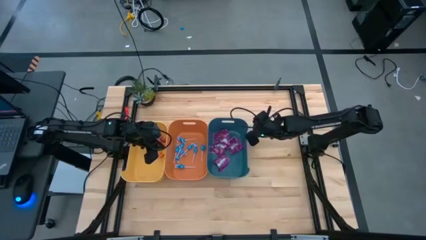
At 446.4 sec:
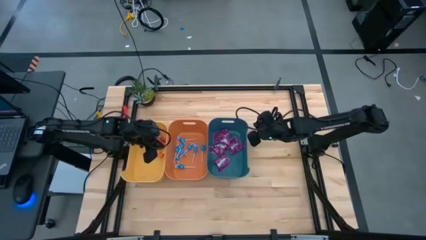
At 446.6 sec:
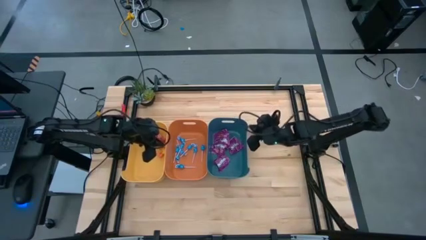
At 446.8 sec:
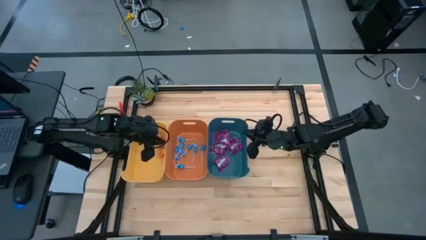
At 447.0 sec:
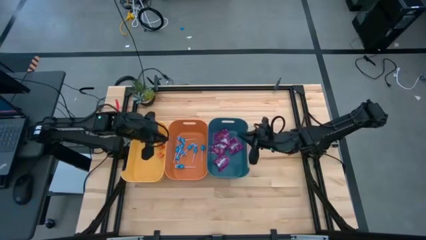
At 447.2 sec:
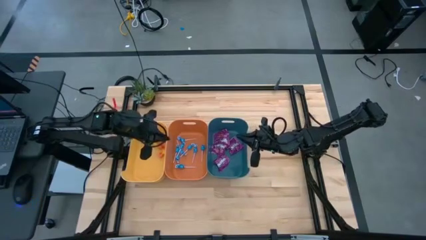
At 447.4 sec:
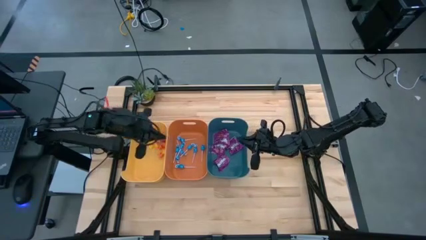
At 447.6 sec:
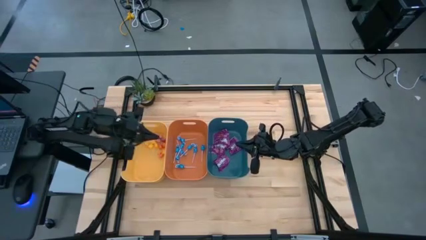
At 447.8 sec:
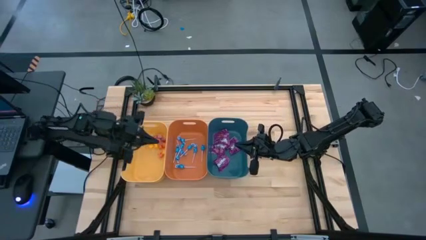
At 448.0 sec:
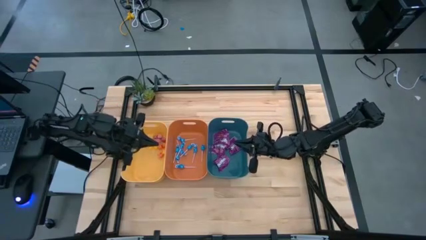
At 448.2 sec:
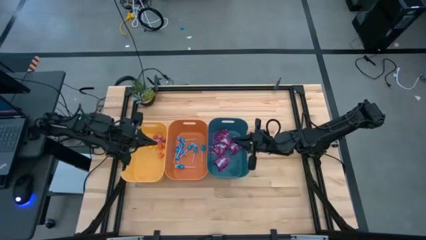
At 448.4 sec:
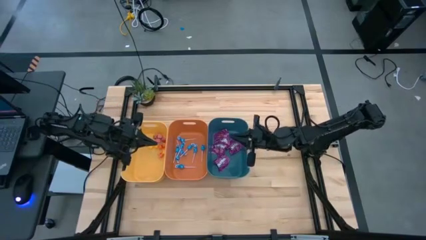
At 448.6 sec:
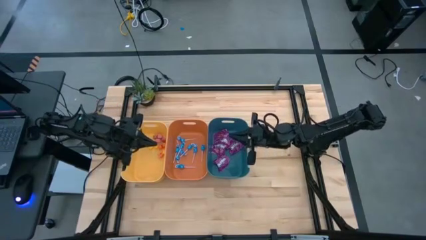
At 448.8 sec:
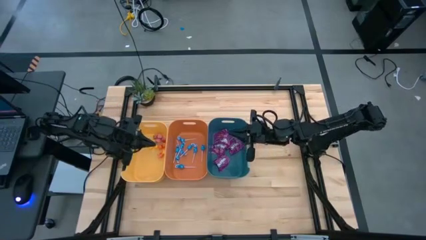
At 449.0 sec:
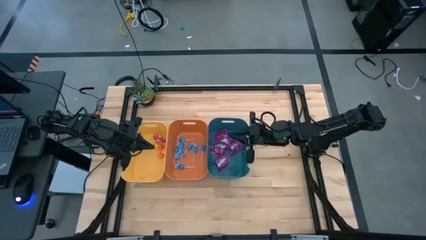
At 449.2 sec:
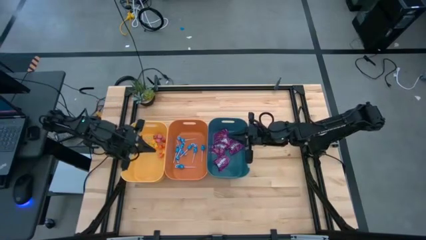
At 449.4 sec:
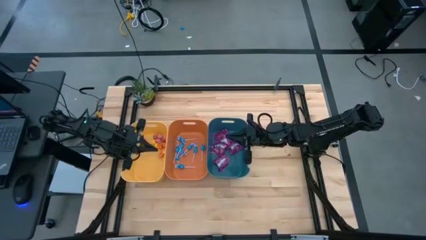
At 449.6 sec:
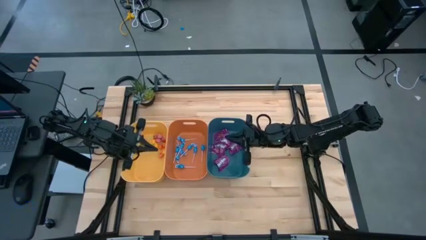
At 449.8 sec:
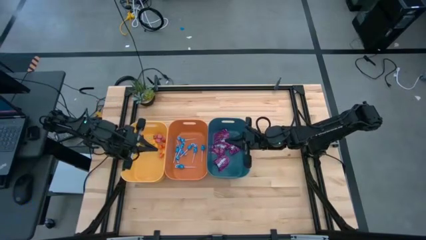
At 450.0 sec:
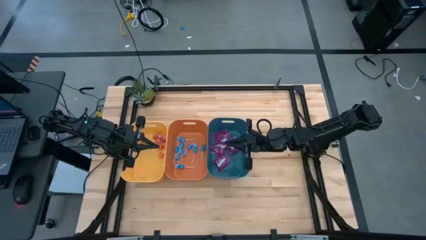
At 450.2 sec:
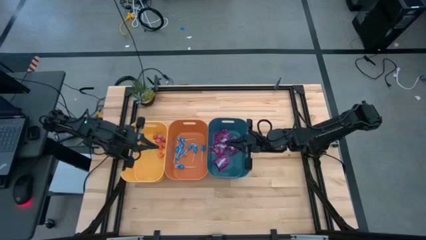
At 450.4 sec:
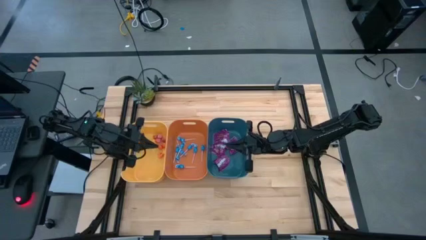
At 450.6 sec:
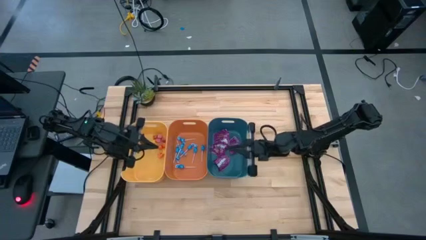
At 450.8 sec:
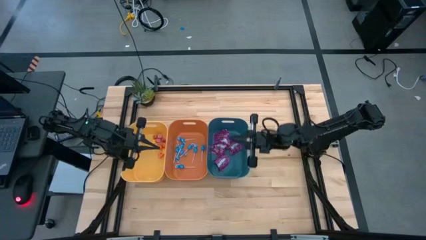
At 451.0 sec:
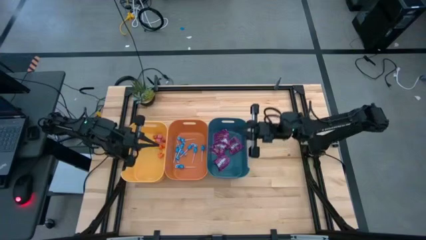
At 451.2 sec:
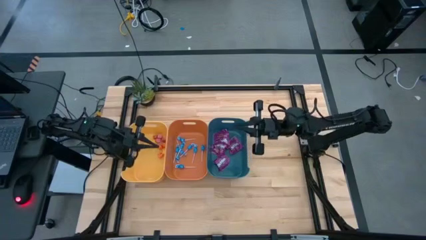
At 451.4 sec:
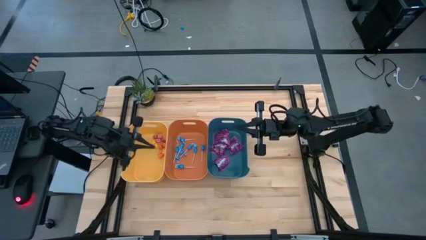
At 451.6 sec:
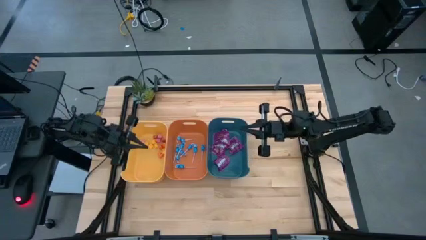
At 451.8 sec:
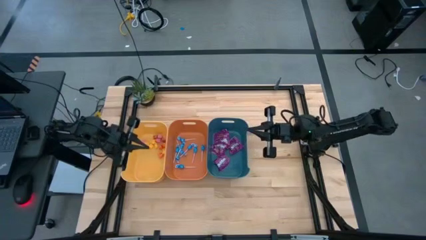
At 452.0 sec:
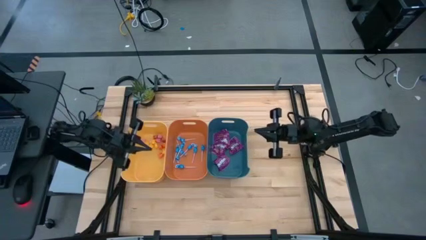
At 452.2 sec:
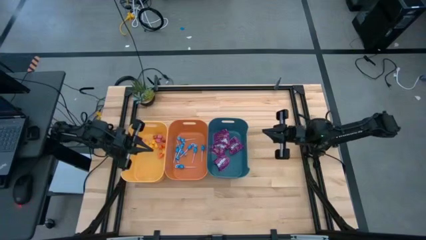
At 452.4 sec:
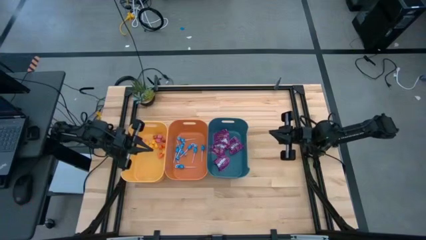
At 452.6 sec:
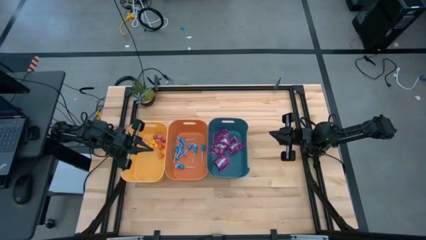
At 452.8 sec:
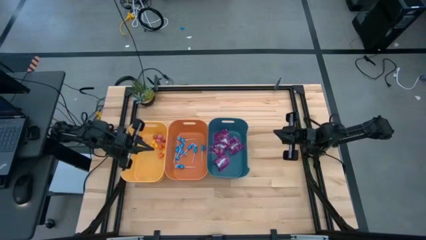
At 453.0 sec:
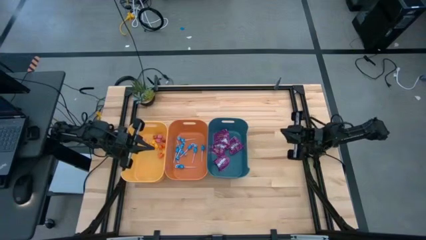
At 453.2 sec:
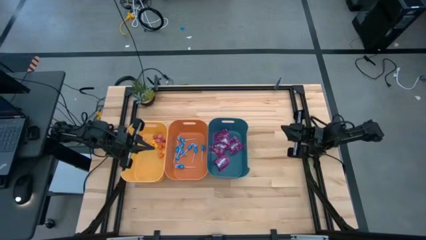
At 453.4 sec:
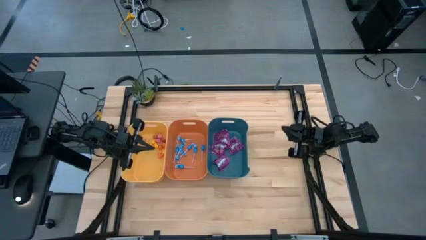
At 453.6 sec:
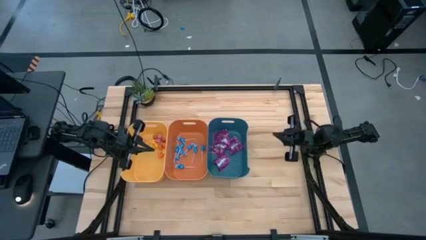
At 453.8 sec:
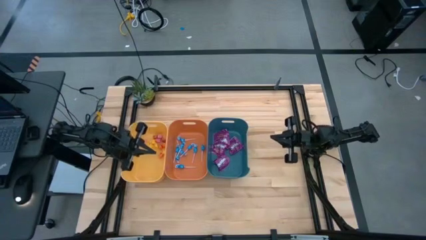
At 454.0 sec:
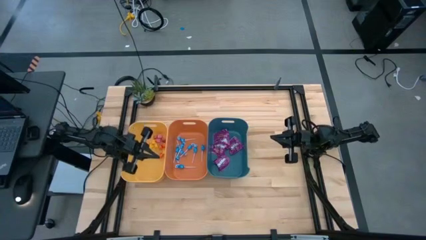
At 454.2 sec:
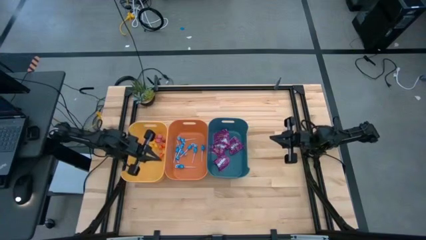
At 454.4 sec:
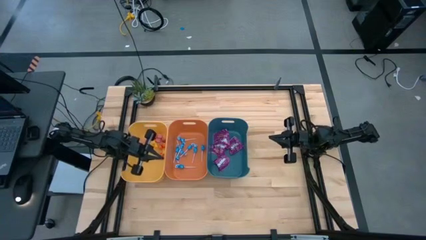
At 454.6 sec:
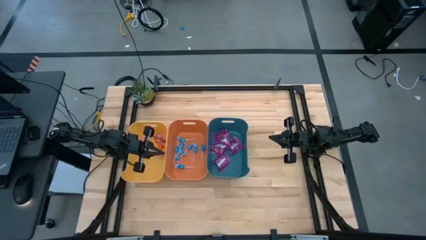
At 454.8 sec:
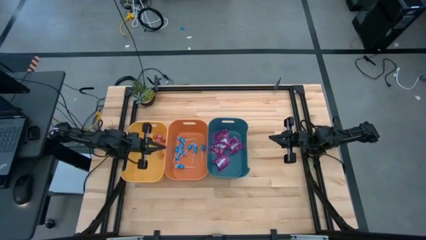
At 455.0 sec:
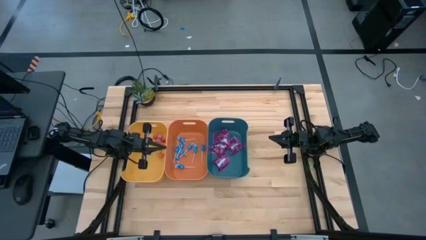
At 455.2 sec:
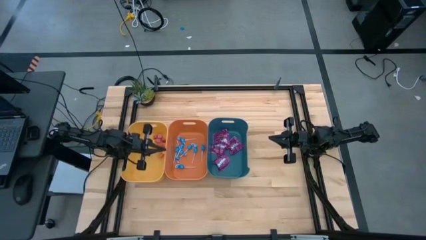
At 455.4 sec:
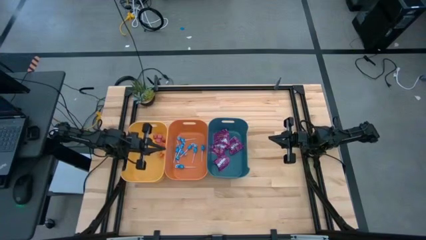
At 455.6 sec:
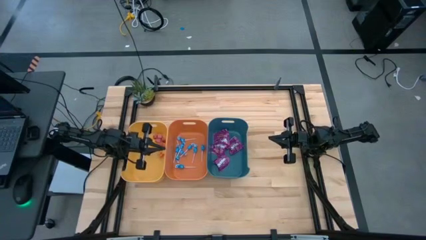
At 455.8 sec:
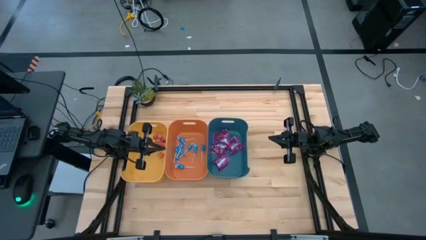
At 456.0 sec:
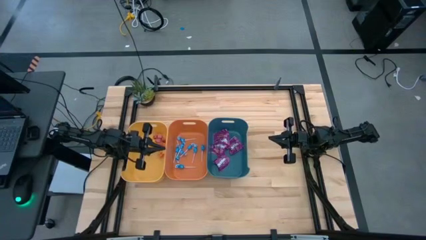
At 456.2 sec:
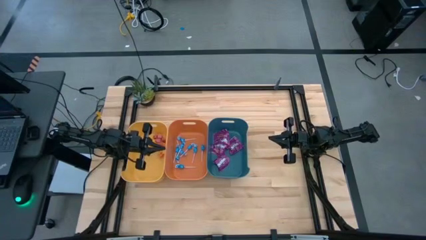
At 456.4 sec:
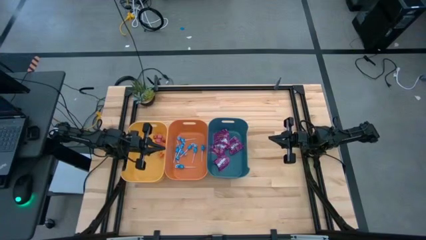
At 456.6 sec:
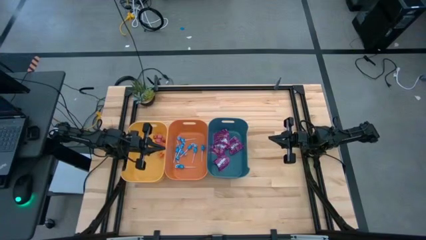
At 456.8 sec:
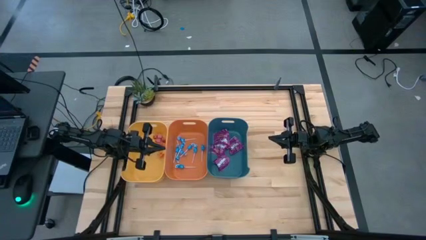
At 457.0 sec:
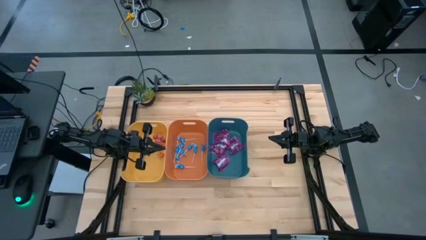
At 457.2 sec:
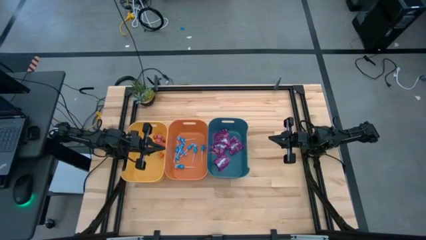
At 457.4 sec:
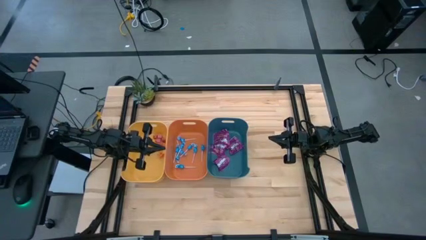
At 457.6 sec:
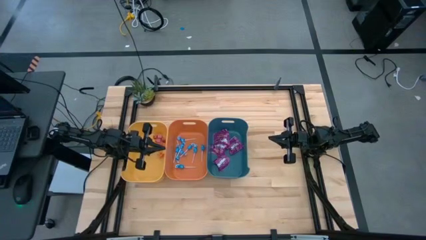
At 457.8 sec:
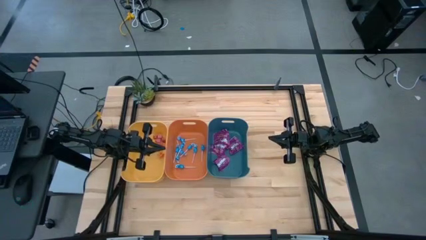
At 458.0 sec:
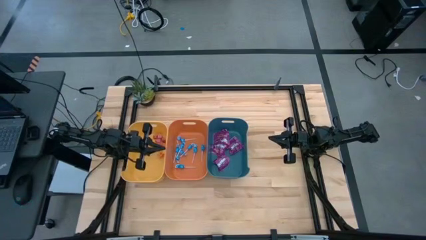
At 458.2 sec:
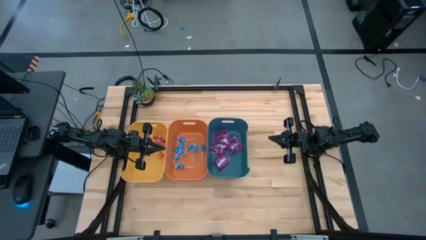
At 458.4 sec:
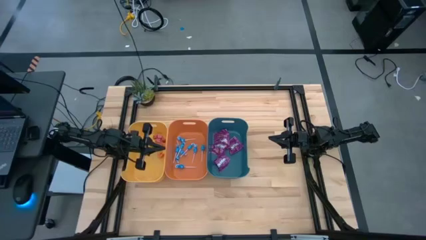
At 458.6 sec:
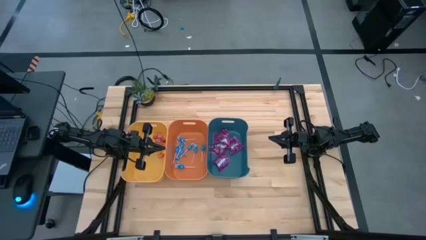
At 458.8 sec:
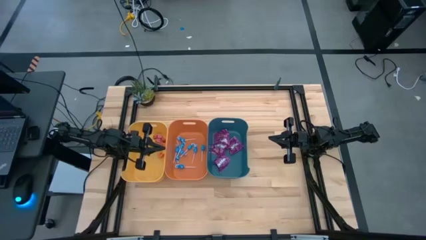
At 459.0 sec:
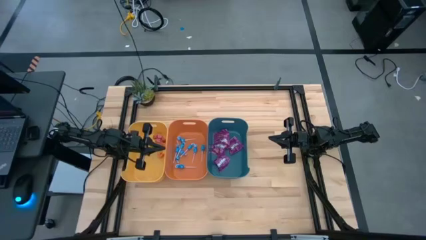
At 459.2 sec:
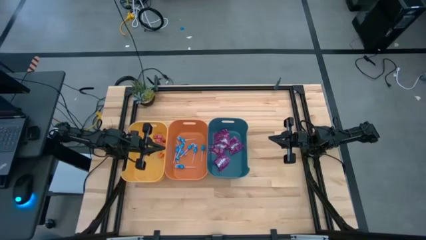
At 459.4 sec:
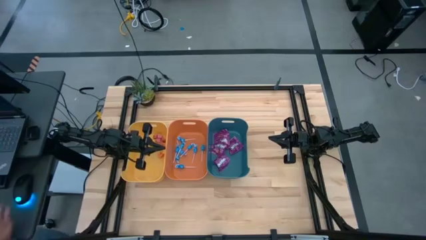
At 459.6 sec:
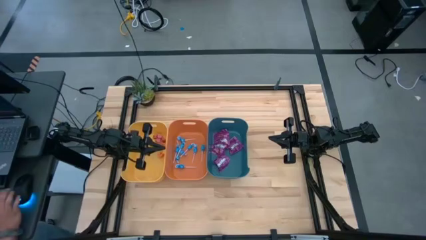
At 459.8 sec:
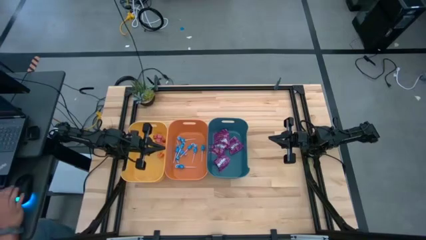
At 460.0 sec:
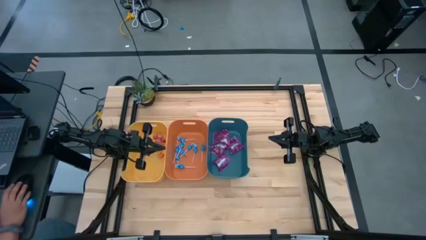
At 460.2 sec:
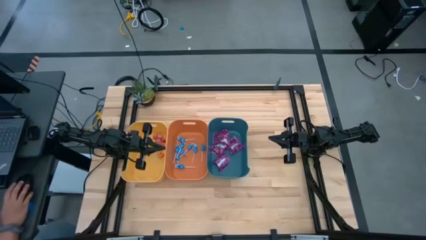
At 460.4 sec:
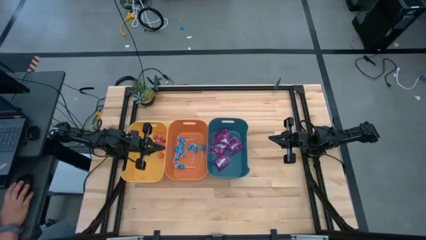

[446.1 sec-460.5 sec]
Task: Sort candy
Return to Home Position
